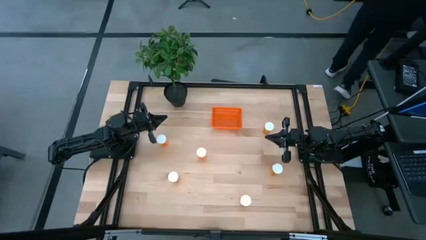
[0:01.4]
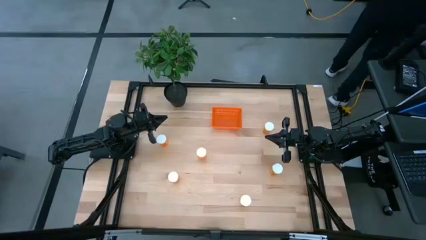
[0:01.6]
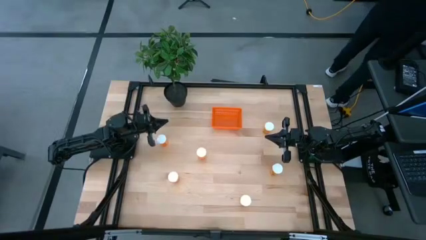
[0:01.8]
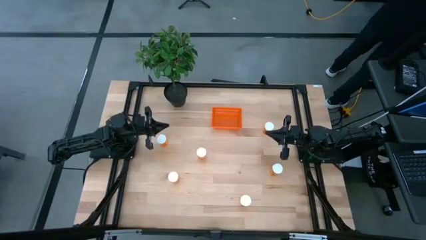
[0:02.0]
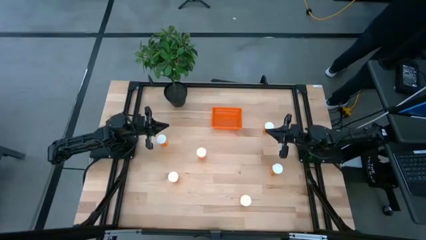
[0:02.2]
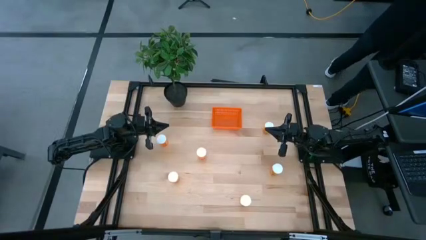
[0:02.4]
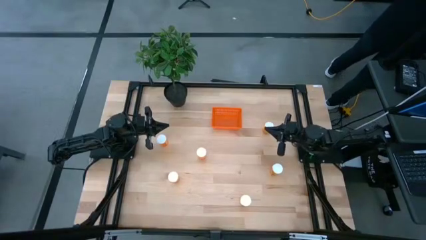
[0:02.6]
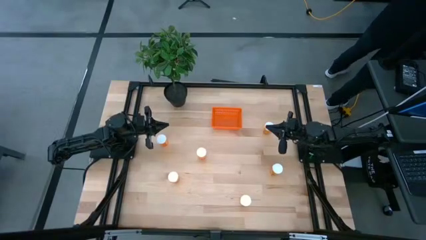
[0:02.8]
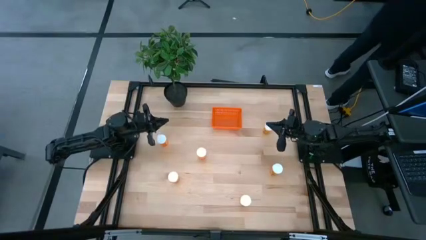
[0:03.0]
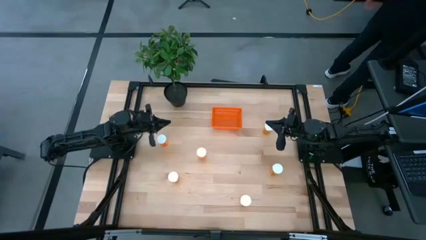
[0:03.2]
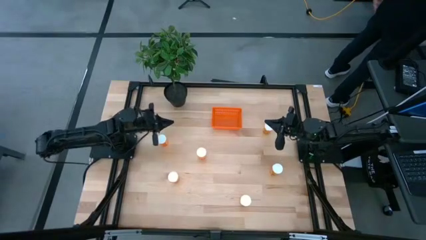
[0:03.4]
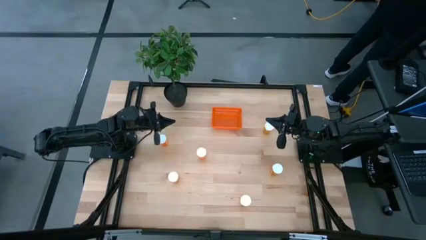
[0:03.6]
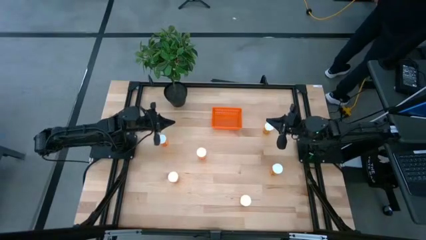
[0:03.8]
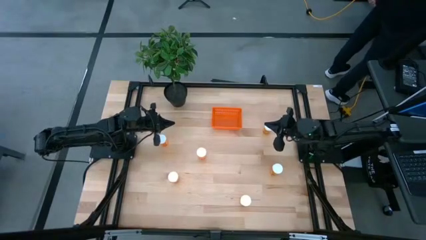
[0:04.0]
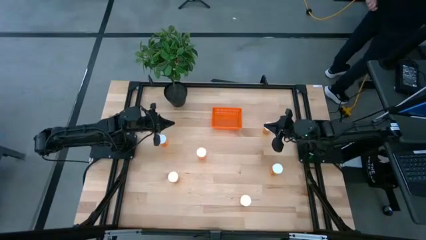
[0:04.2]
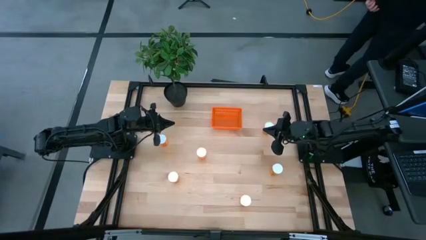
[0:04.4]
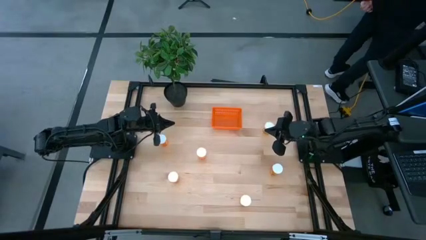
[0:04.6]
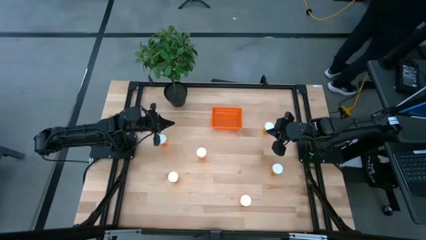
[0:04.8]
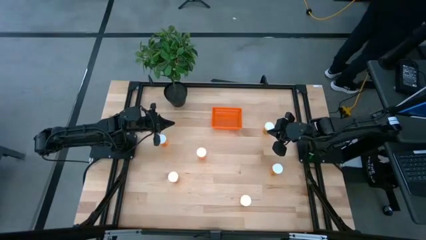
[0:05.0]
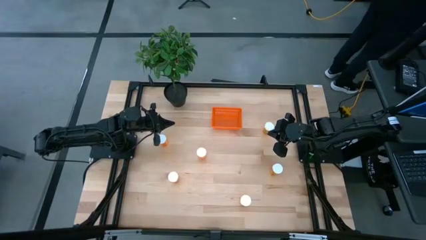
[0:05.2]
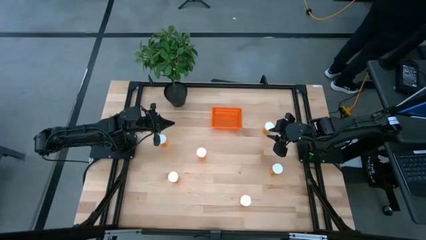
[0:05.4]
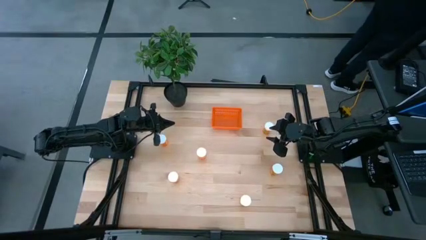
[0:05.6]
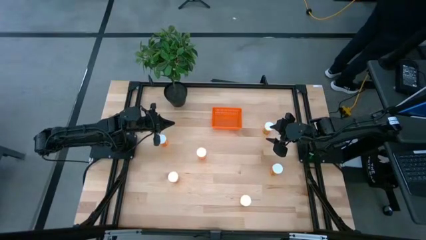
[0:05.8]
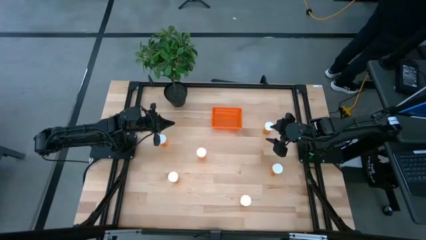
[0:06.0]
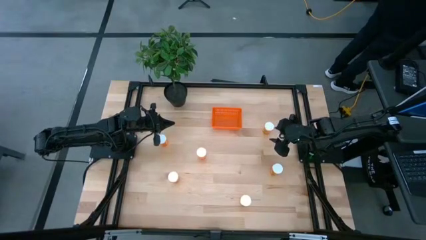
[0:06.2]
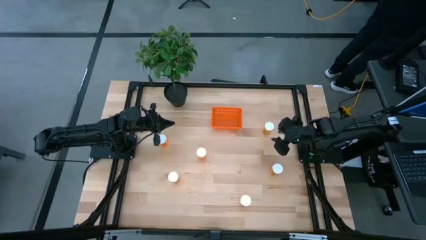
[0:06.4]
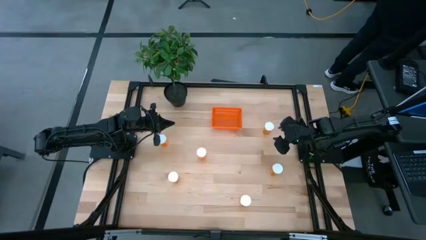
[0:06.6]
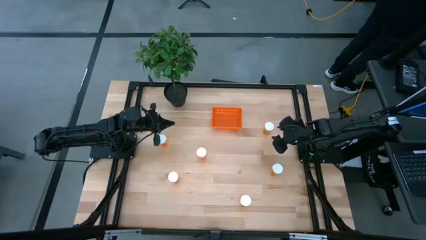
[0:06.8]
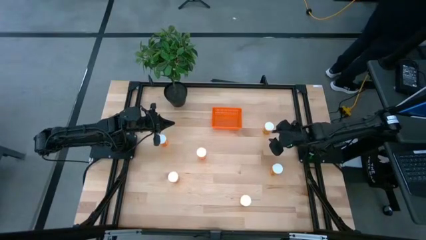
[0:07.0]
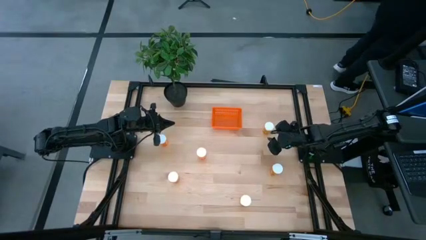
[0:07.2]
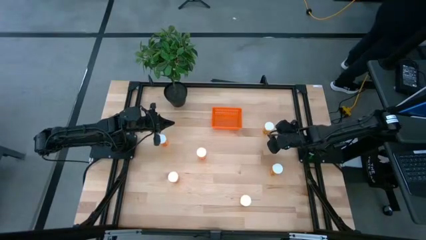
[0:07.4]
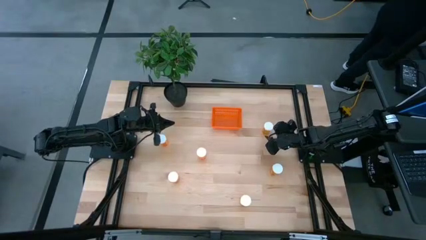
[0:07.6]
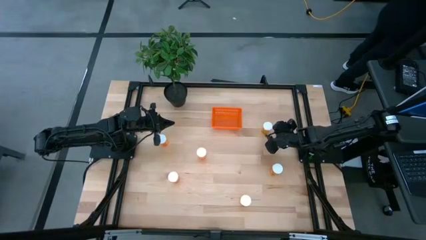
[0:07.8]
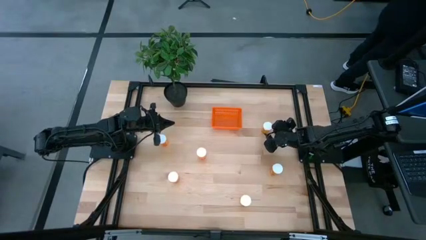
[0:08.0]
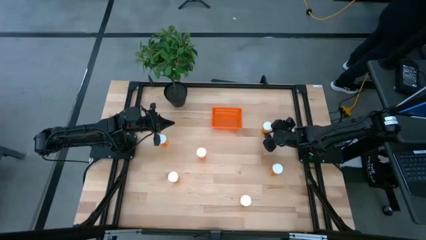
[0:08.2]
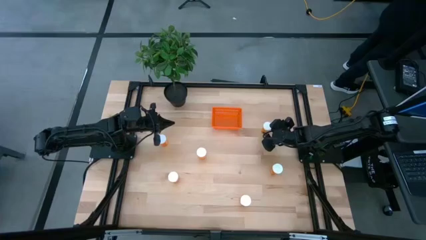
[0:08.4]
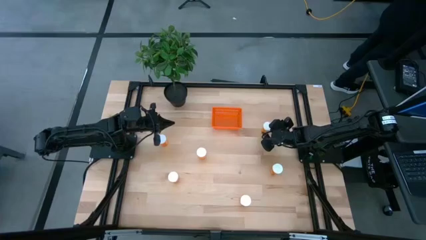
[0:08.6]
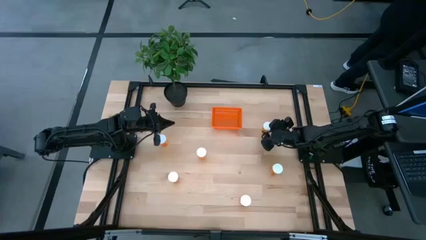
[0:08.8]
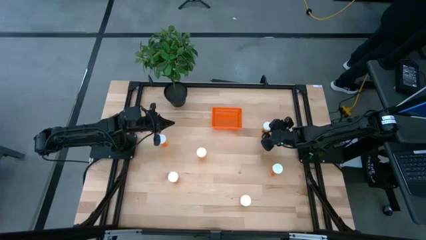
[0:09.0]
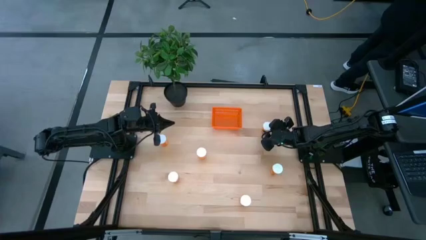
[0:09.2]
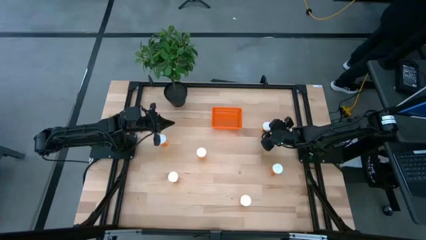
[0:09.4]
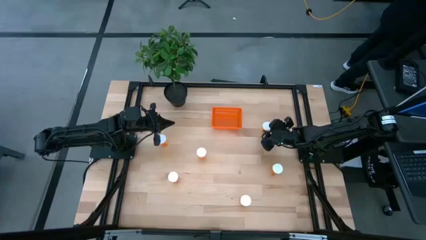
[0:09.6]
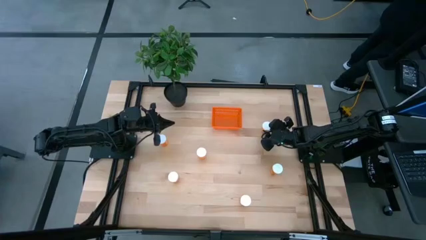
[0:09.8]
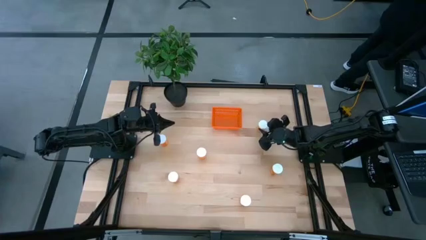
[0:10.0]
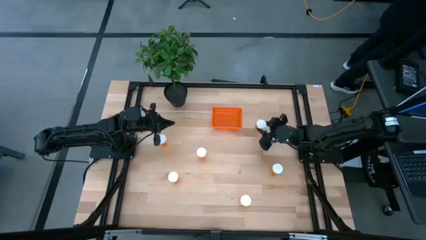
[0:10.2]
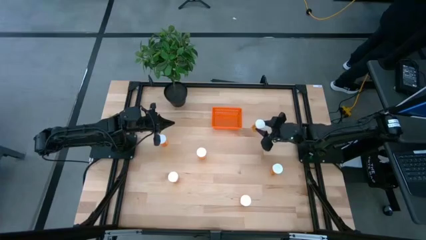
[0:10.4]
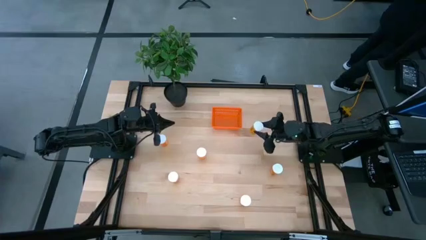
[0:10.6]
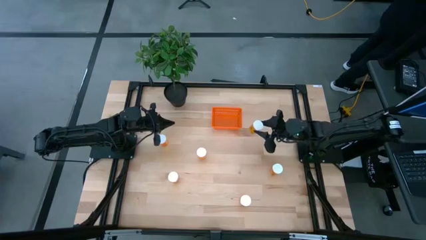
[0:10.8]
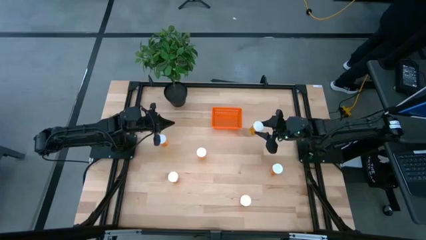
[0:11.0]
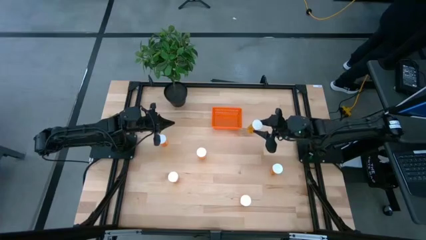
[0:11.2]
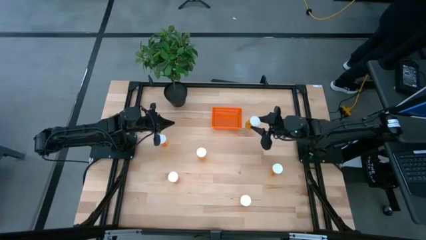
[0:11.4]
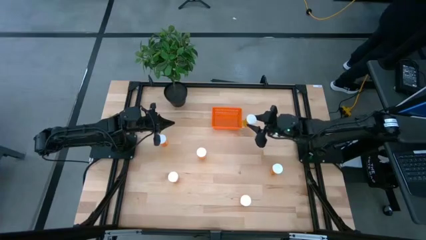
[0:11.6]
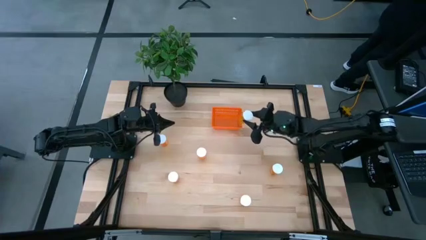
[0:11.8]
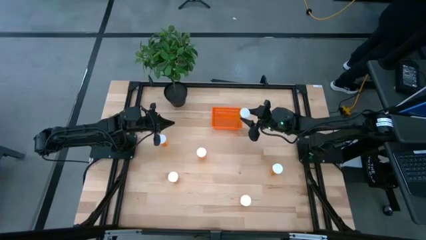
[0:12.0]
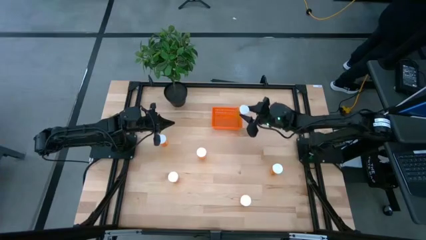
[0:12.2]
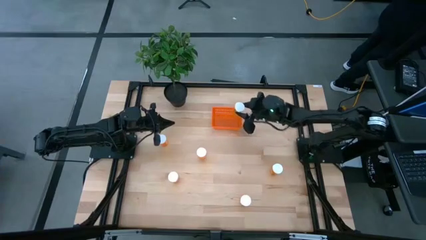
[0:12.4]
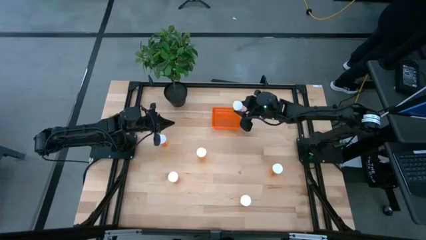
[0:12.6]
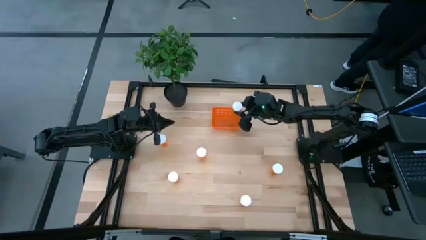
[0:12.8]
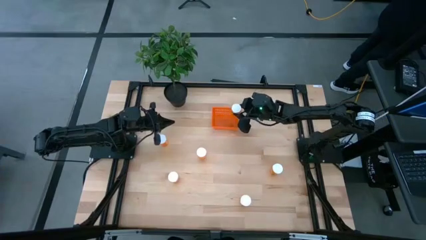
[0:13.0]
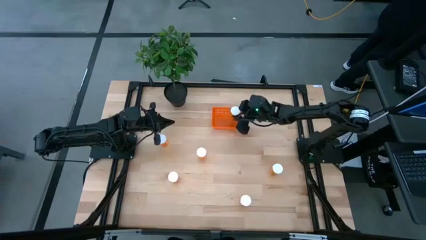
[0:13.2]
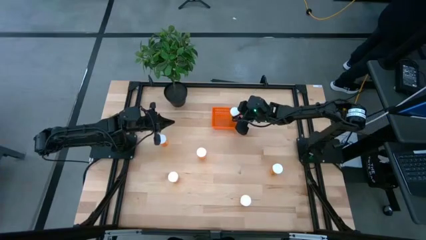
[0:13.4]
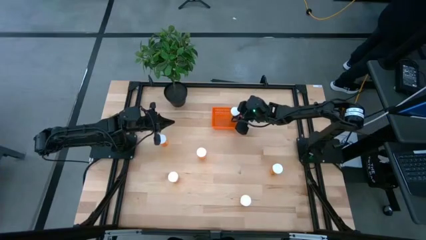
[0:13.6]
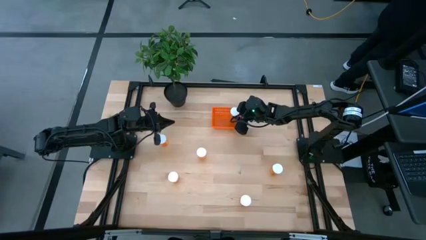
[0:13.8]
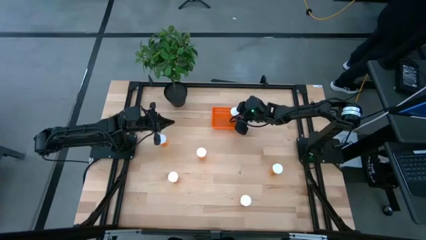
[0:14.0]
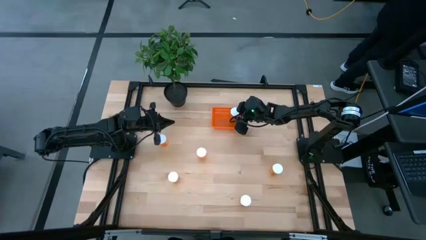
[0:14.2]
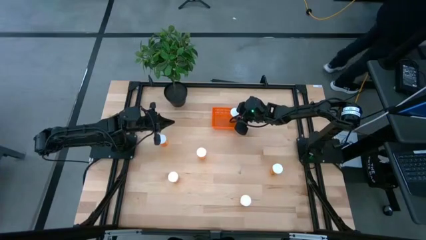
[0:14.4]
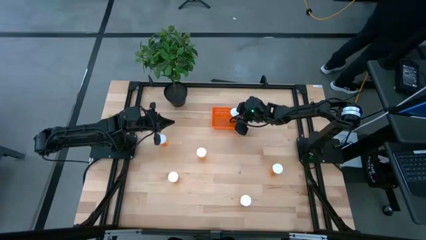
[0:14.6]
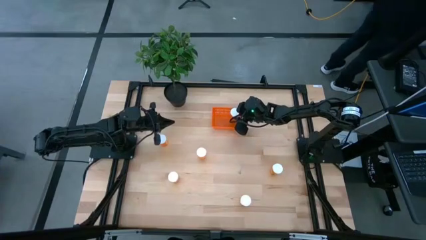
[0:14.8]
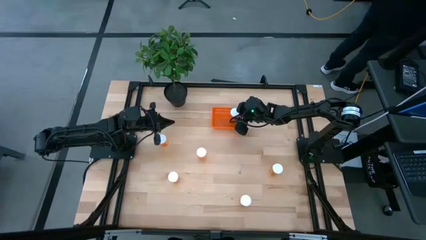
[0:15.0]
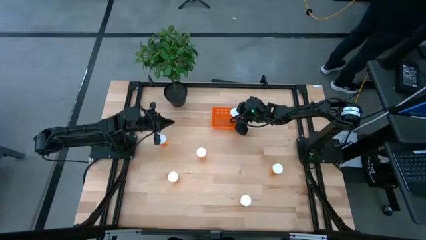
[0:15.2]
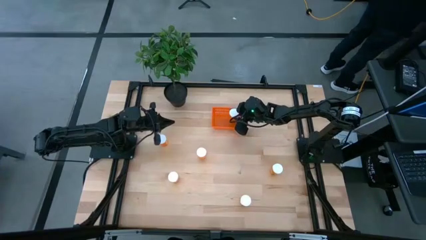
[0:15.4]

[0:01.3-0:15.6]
Task: Pick and place pill bottles into a basket
Put the orange pill bottle into the orange bin
